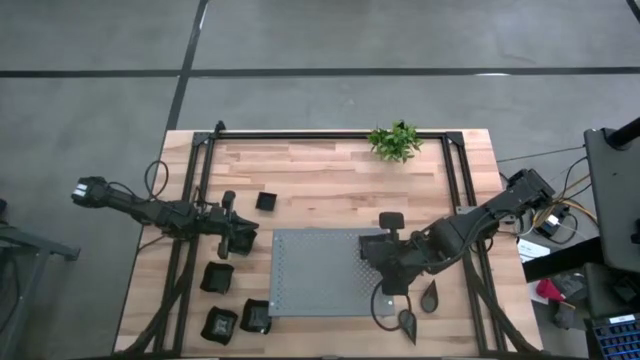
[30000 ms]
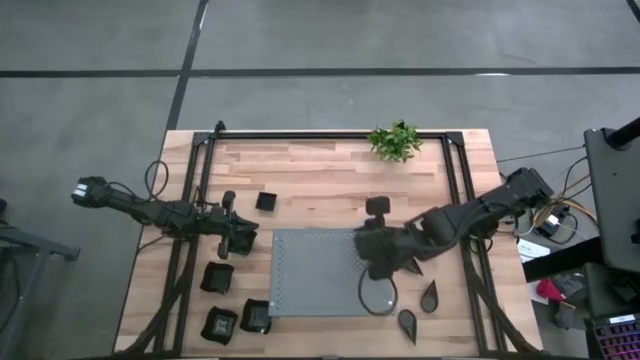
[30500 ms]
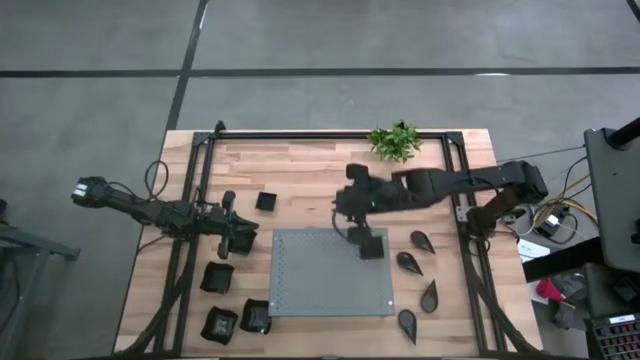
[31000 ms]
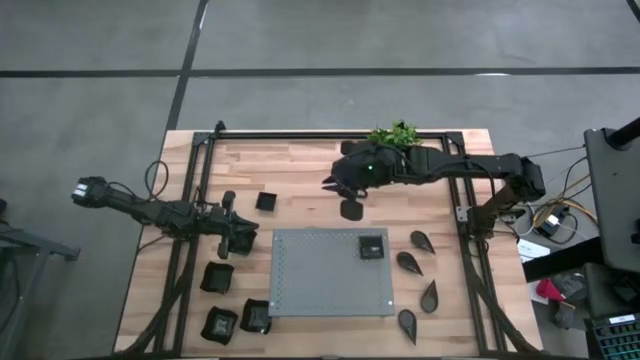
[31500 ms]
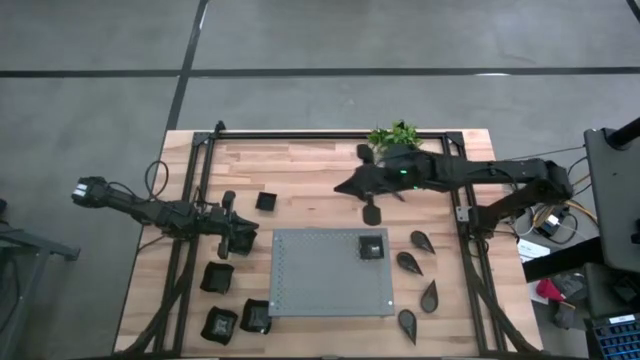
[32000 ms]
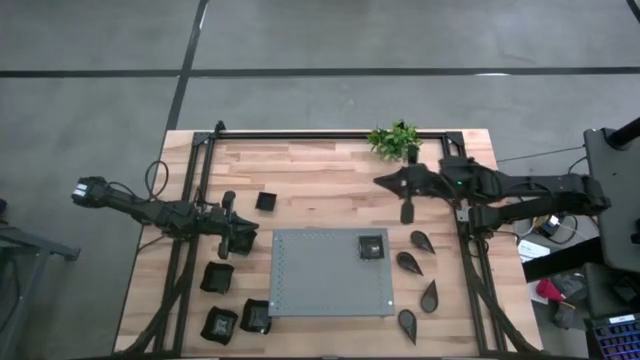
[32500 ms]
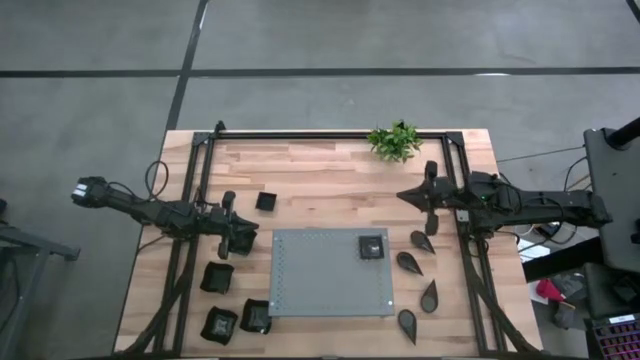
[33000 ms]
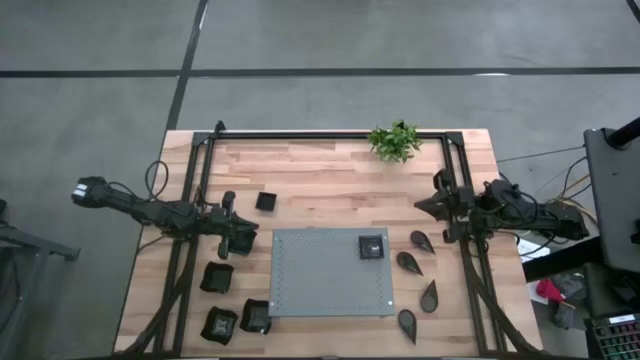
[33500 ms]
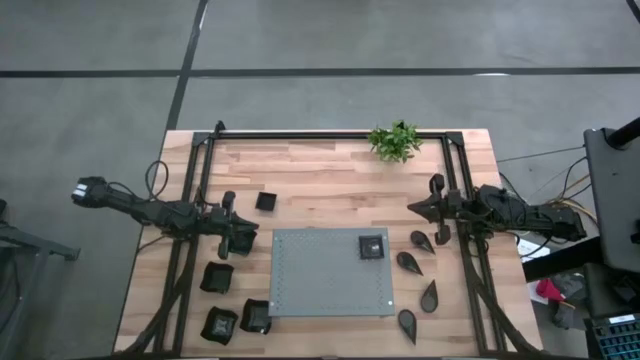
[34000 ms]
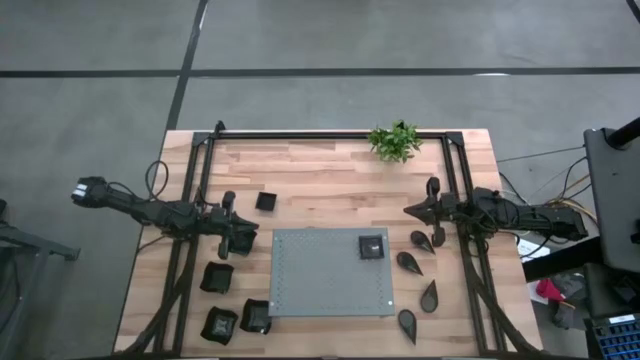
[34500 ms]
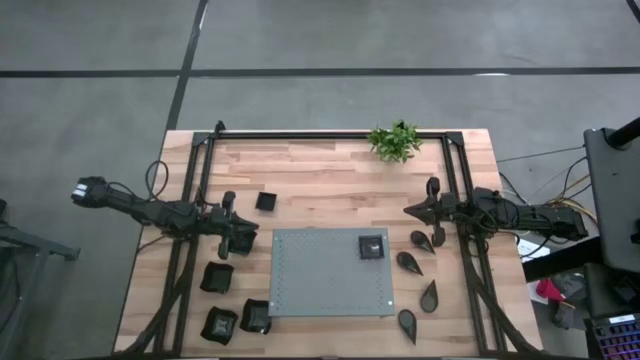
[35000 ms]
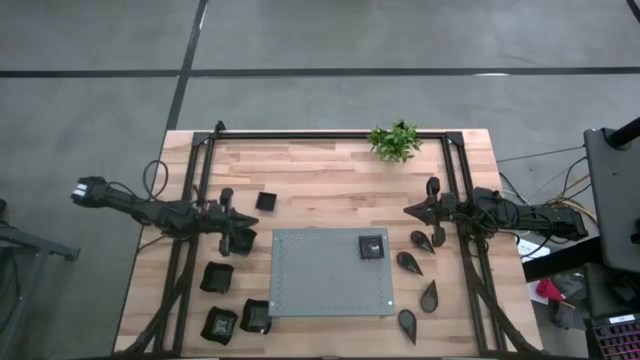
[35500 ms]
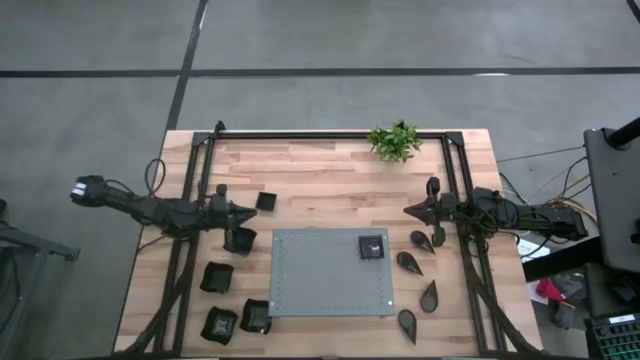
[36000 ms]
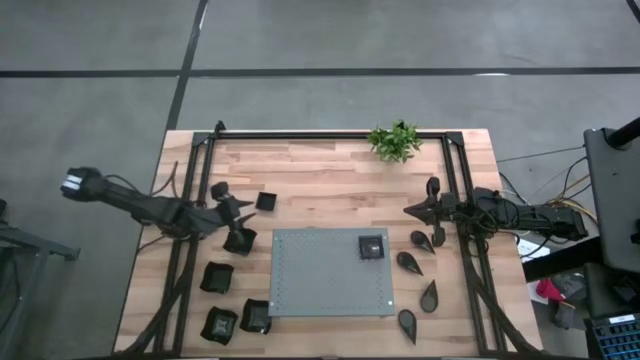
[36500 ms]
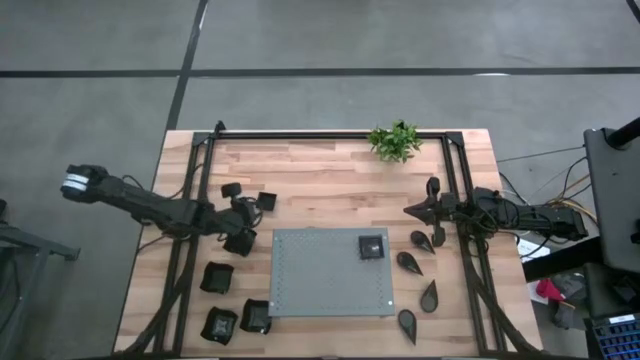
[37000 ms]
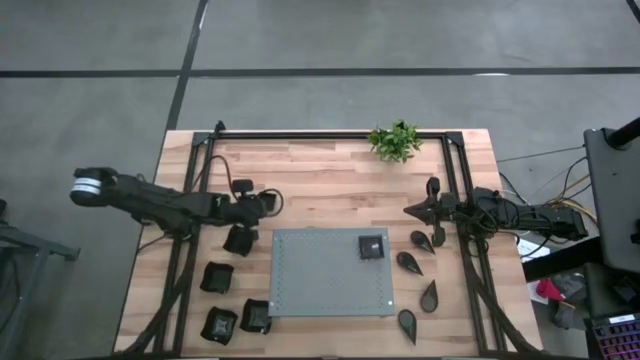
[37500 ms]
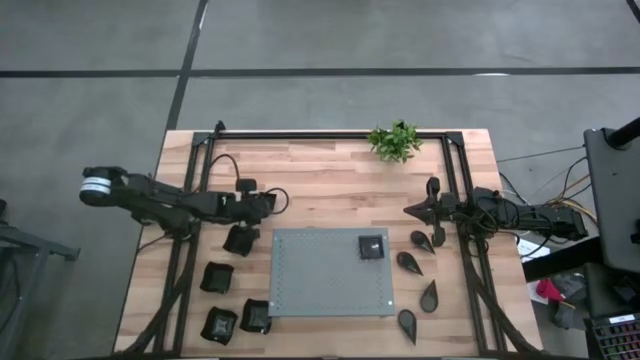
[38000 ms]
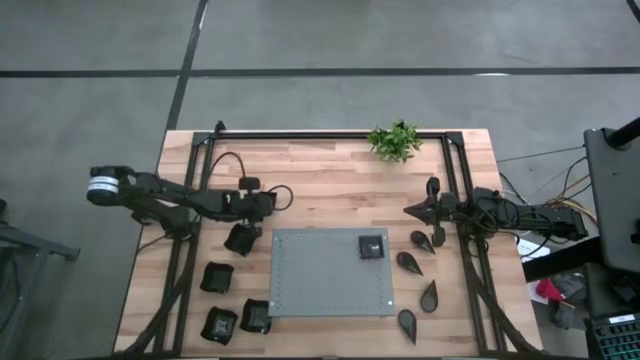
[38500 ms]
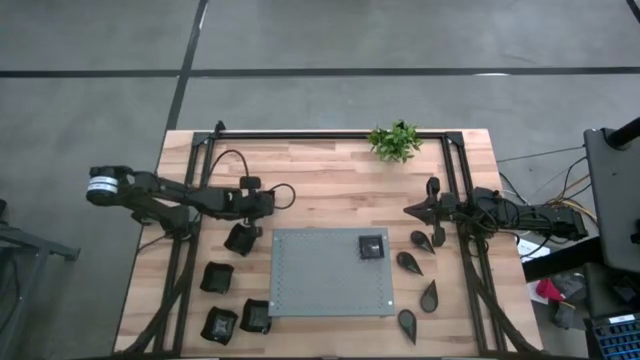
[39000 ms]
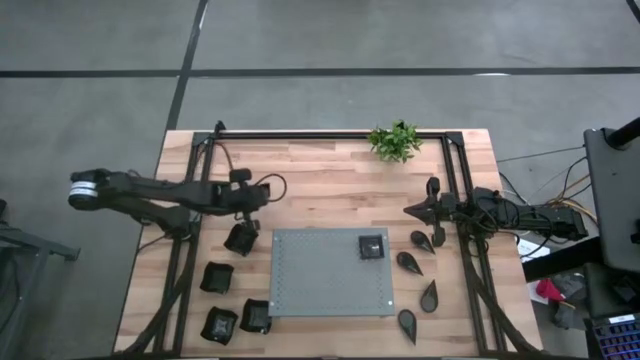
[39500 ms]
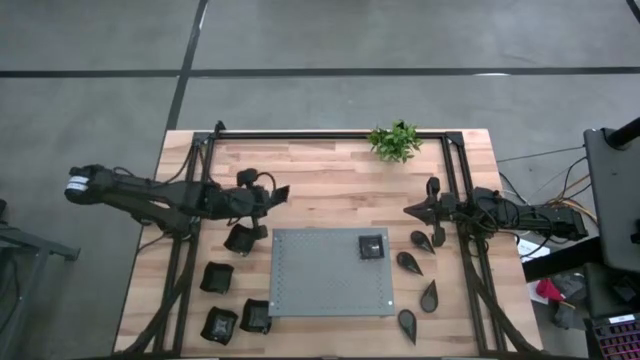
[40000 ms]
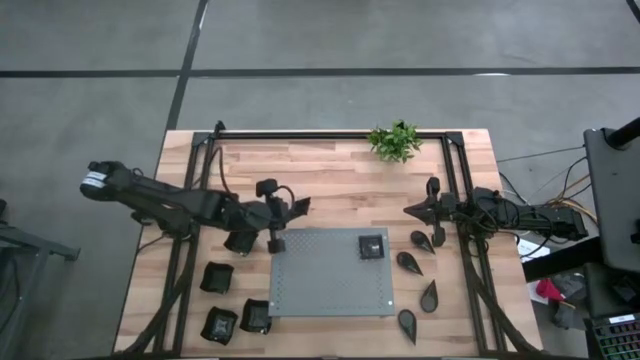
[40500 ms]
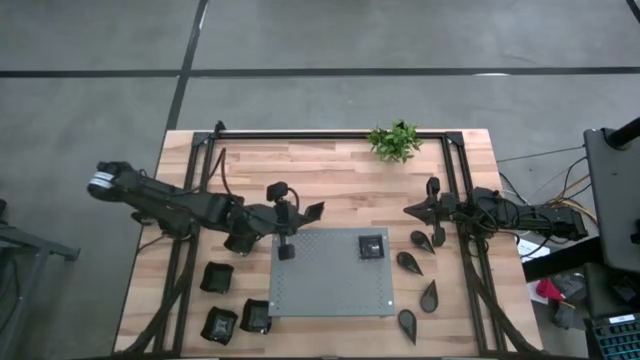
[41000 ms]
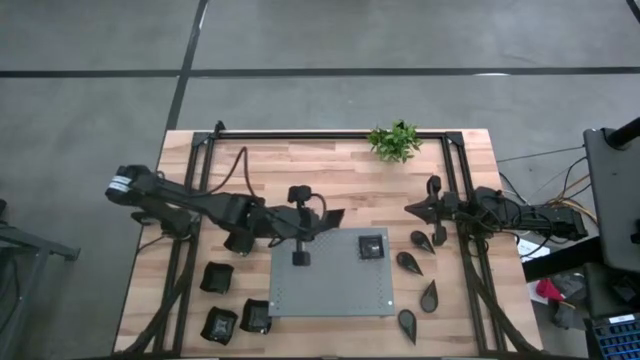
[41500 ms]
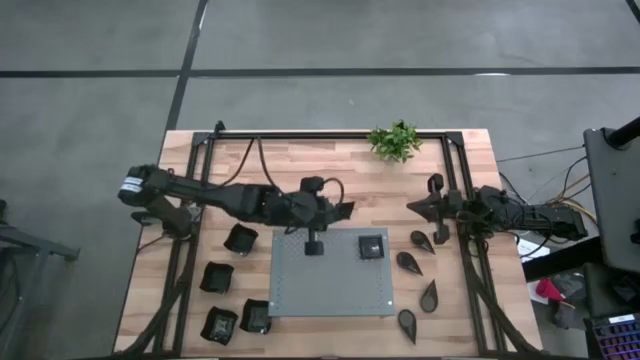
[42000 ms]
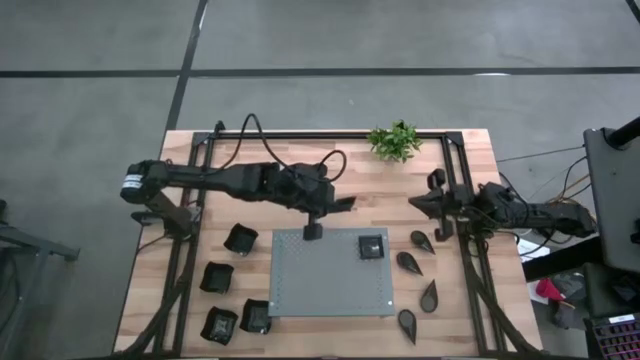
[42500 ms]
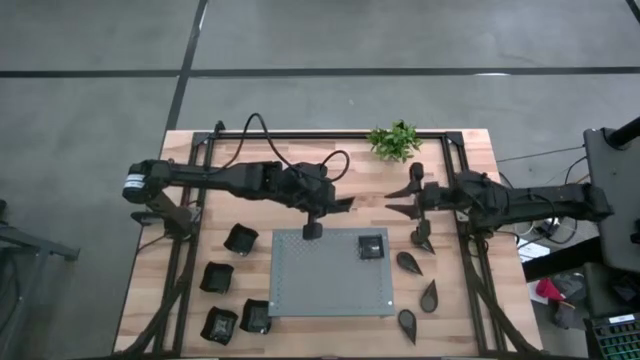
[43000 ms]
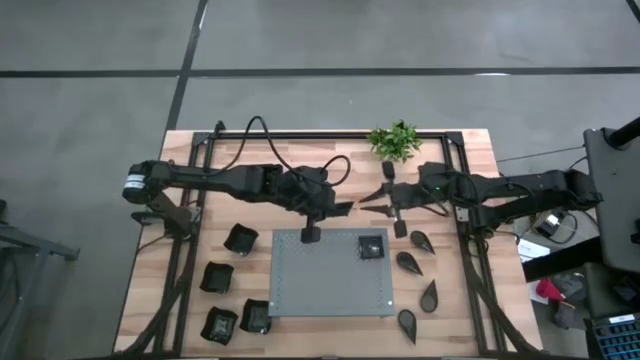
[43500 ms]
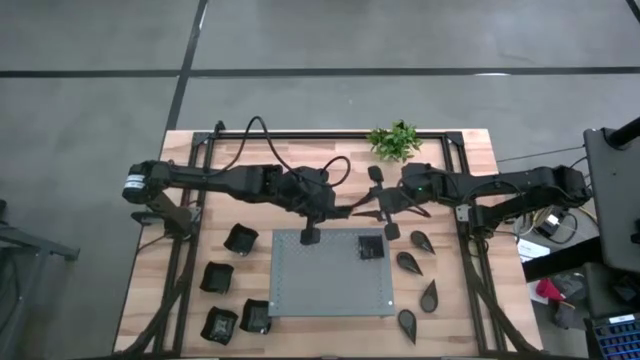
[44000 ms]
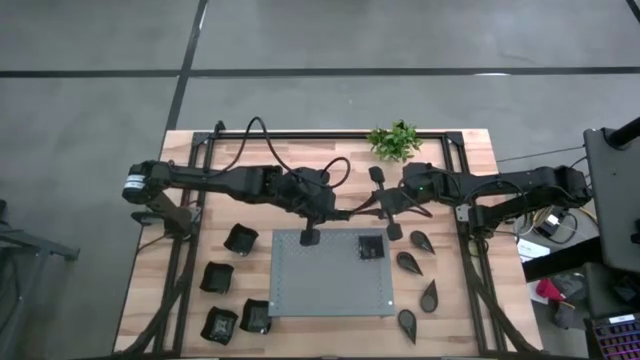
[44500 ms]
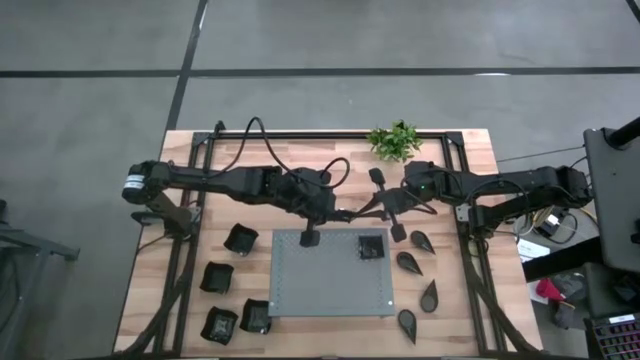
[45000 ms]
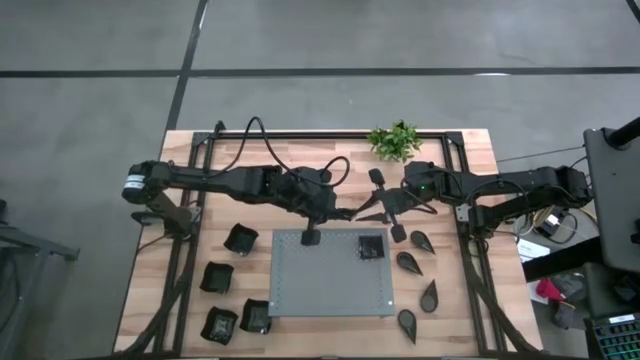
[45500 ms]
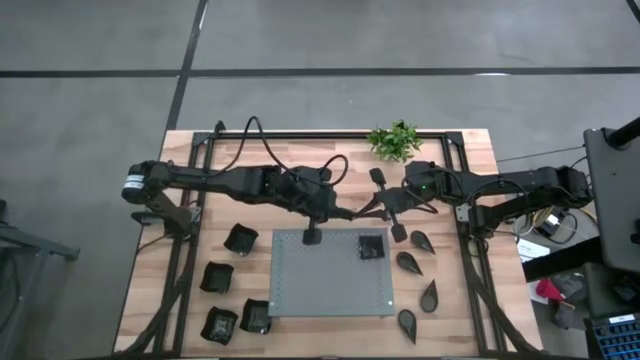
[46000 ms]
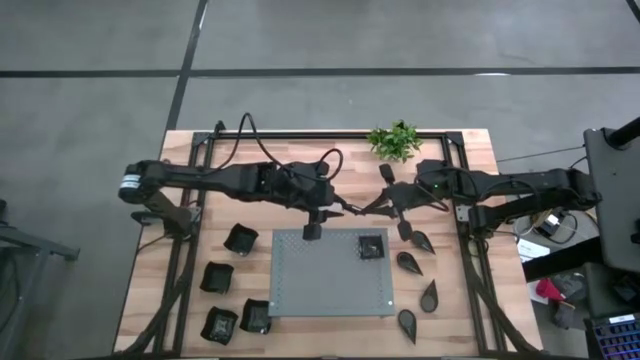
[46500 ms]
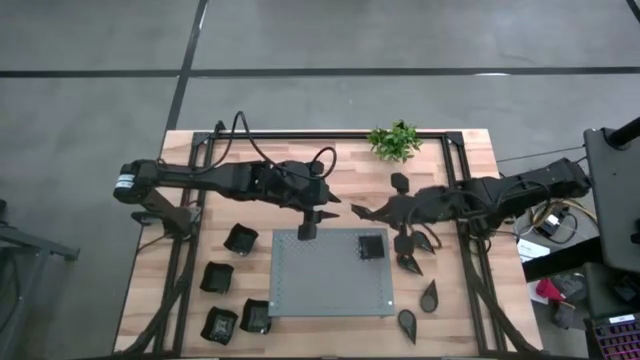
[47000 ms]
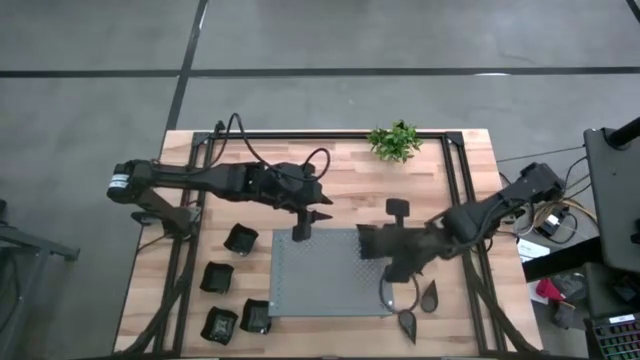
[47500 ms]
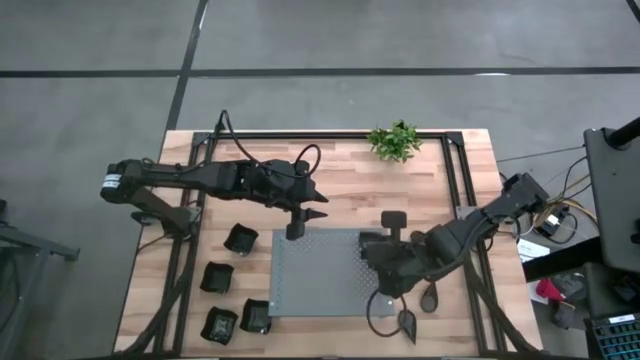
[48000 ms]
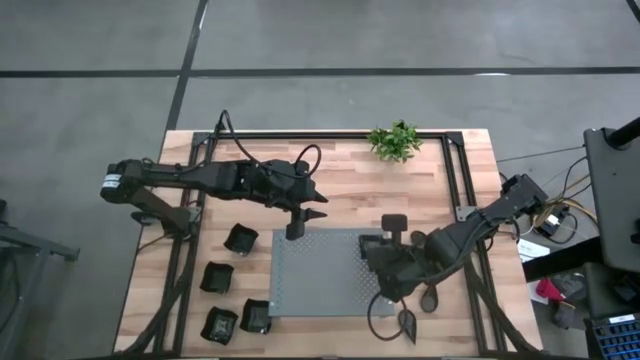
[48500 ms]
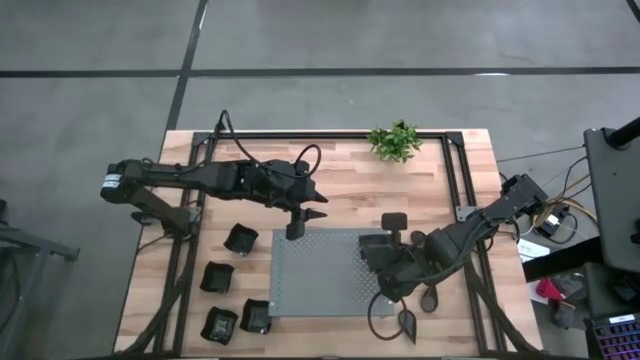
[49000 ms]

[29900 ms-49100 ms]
Task: Pick & Place Mini shaped plates
Stack the square plate on top of the square plate on the shelf
